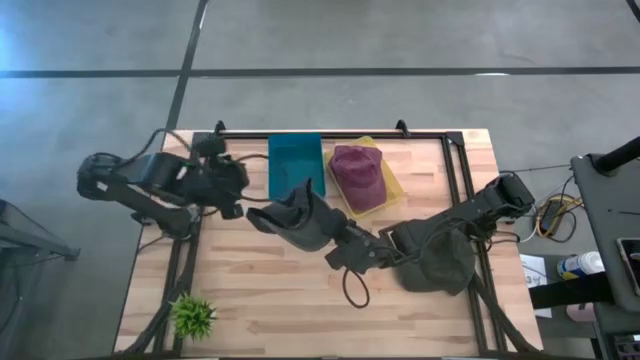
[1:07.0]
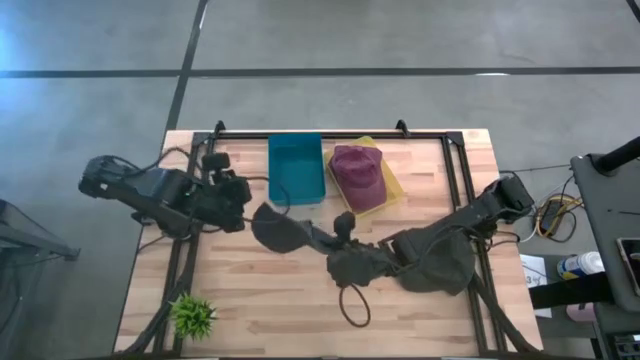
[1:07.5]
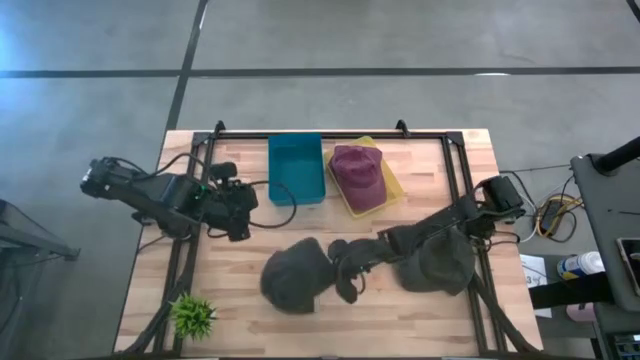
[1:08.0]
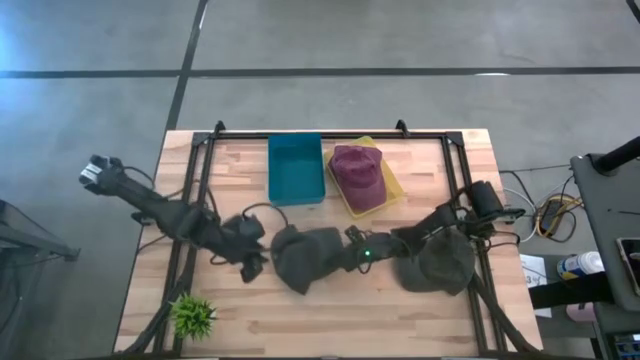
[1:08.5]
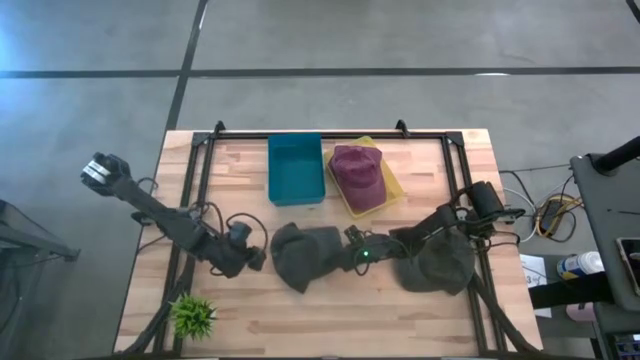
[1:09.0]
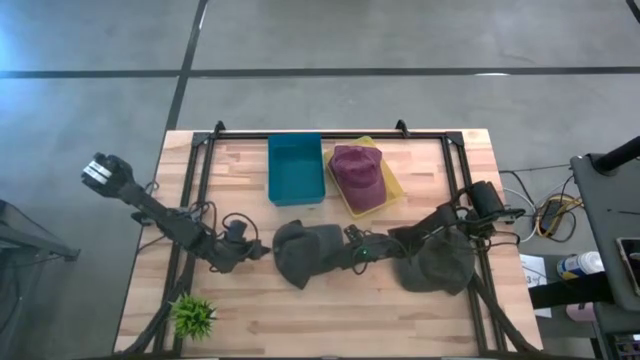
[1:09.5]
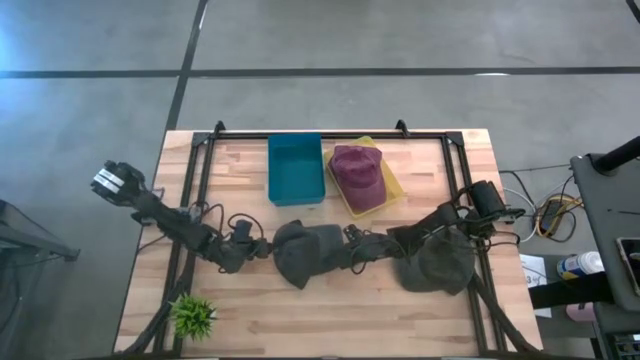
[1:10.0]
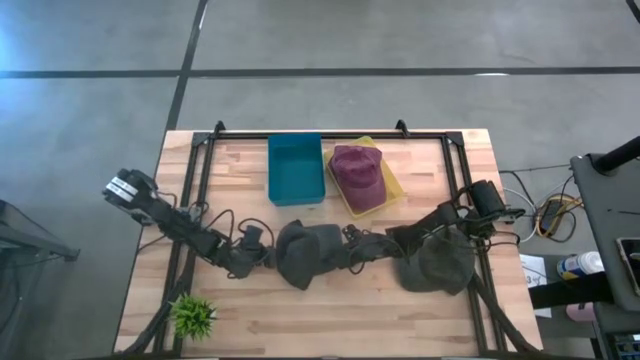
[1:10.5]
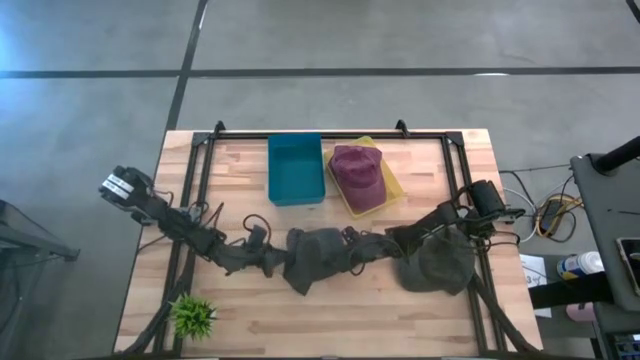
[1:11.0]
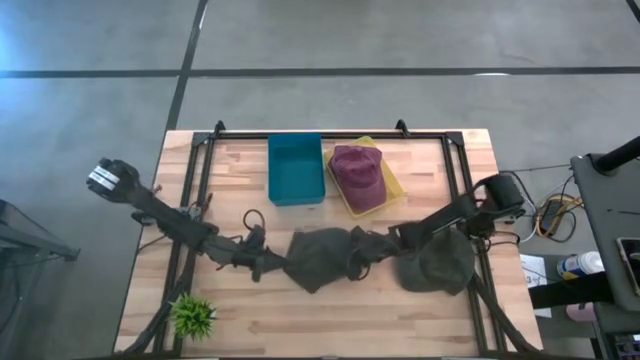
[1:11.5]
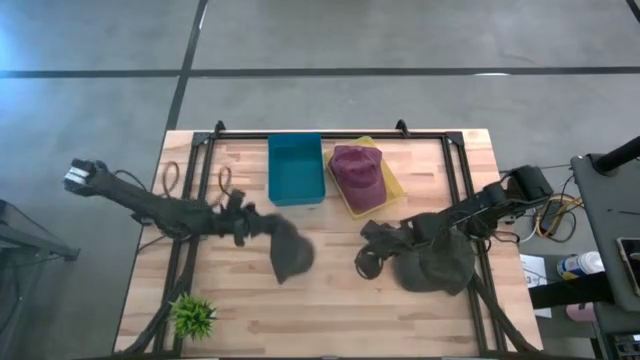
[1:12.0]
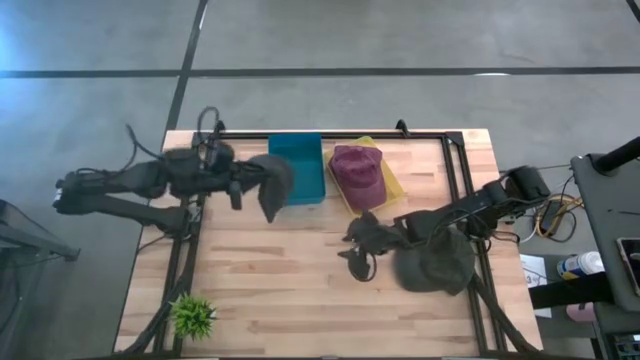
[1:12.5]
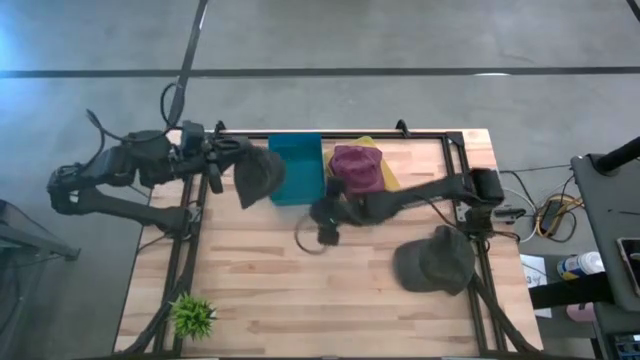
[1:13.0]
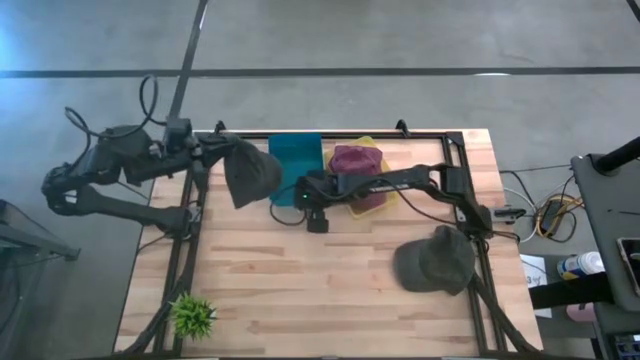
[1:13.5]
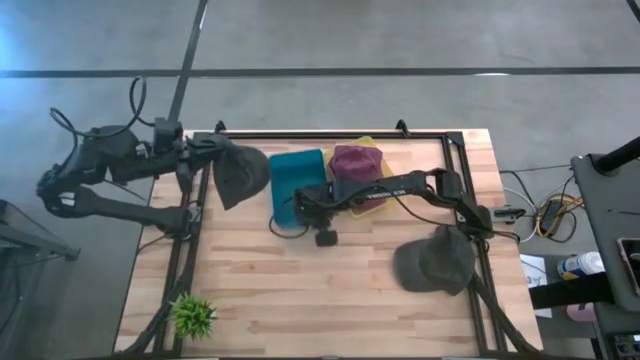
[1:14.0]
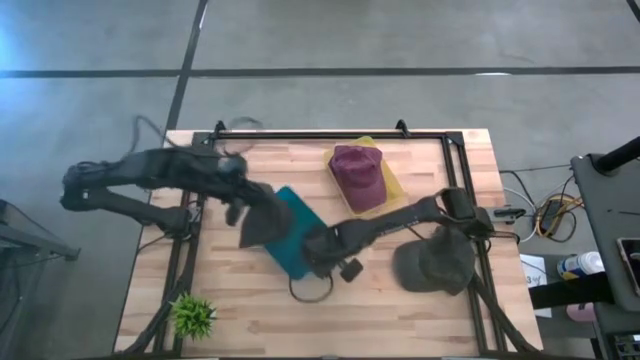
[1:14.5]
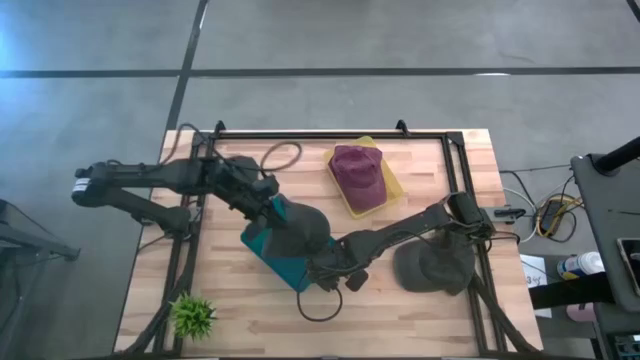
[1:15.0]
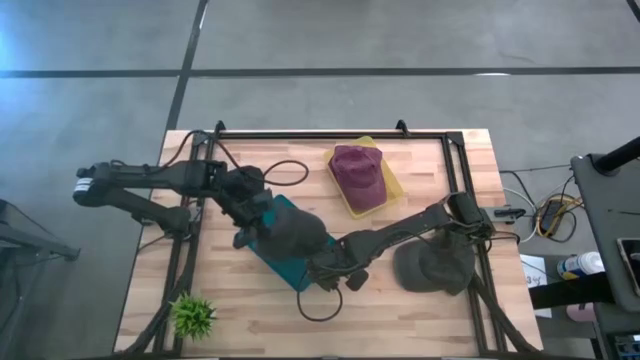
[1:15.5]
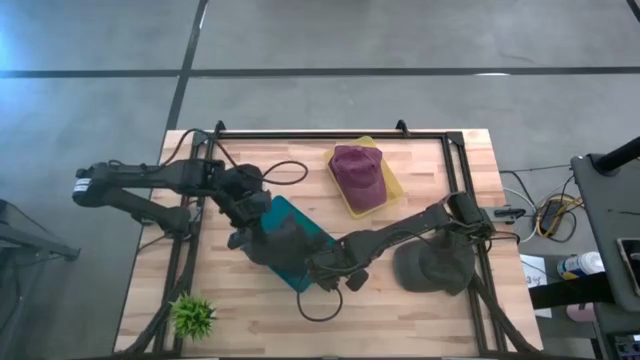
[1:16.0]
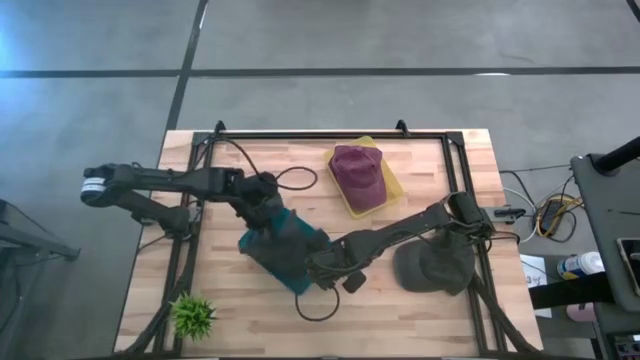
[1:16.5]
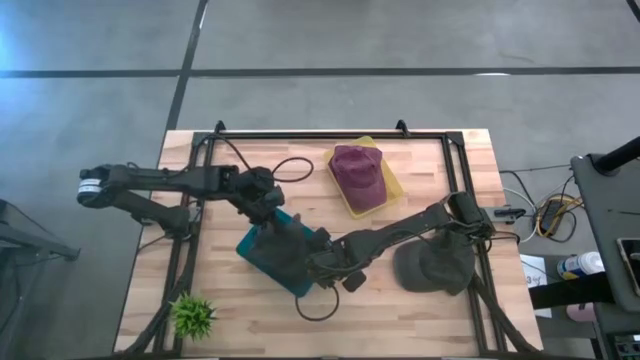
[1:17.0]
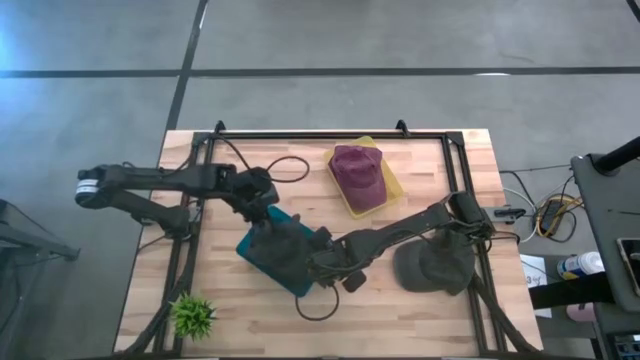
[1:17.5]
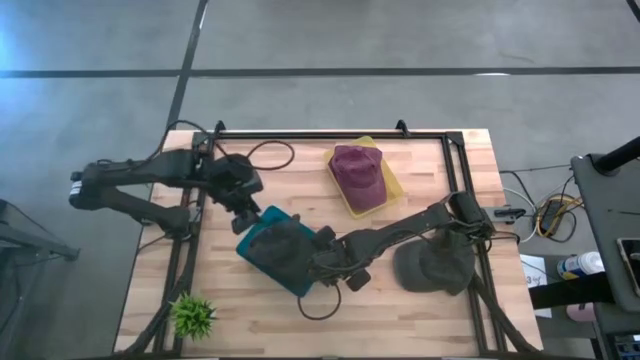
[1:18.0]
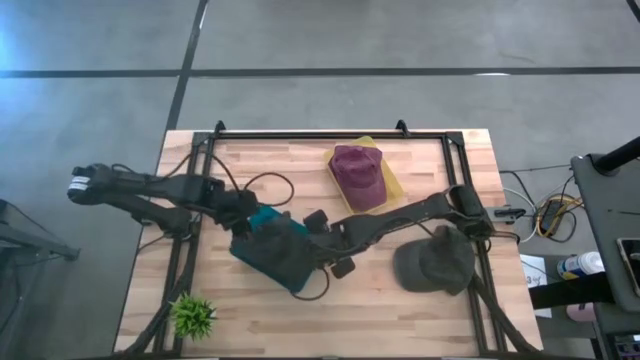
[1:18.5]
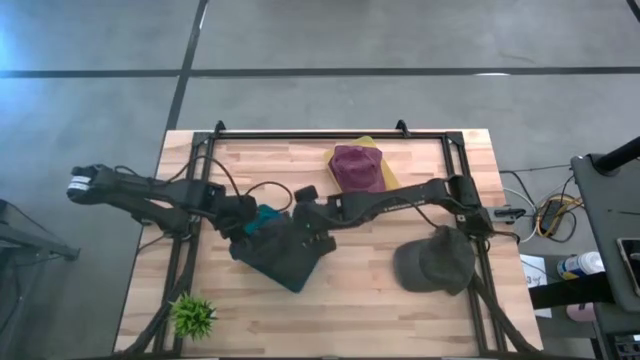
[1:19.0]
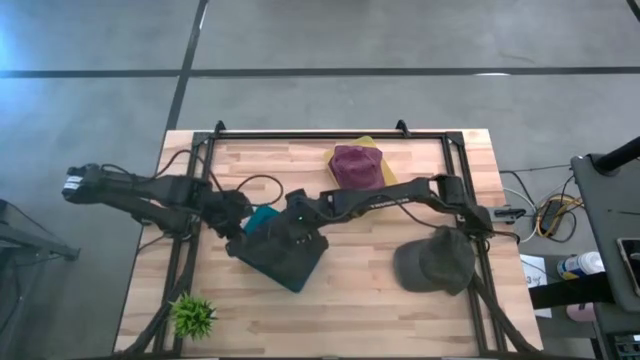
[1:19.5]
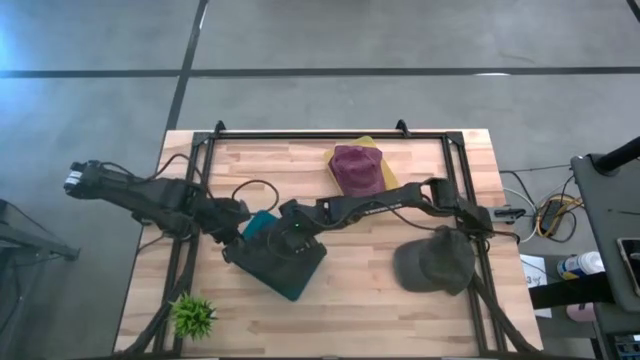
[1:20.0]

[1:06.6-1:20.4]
Task: Pick & Place hat
Put the left black cap into the blue bin

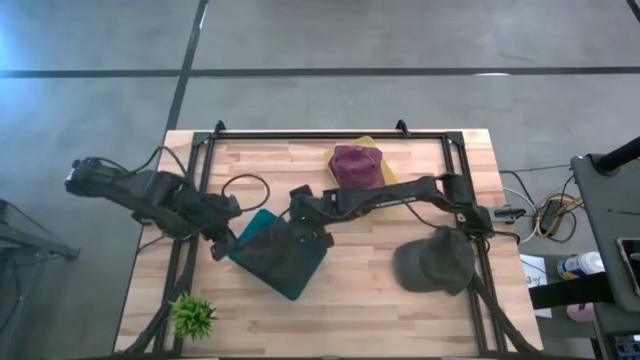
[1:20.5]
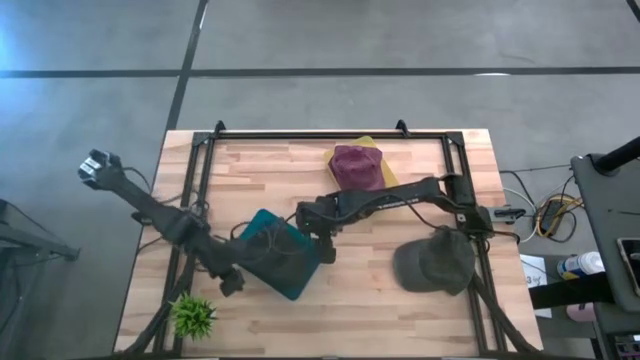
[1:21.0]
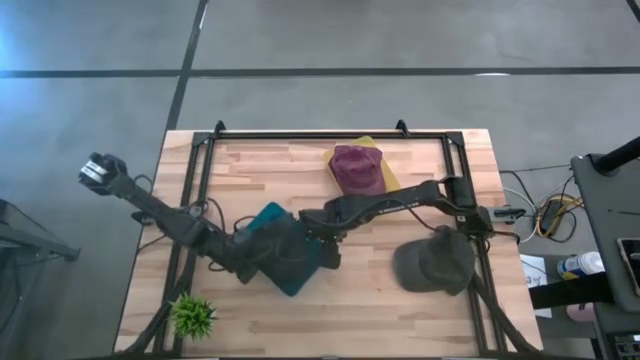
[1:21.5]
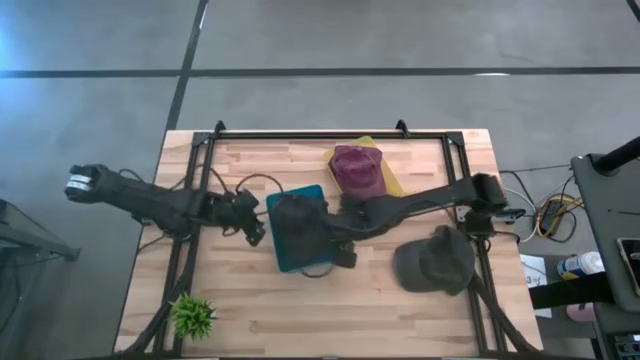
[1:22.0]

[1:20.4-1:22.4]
Adjust the blue bin
